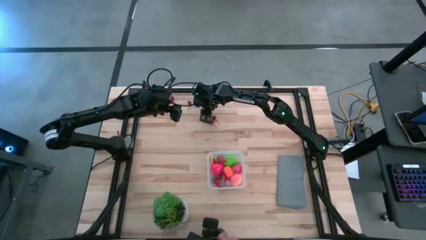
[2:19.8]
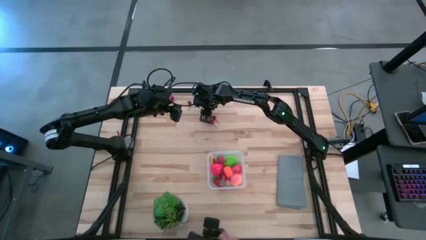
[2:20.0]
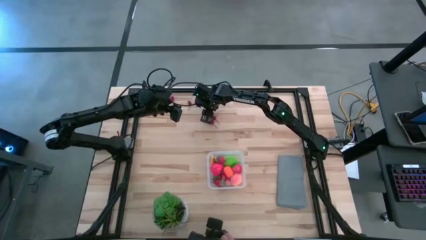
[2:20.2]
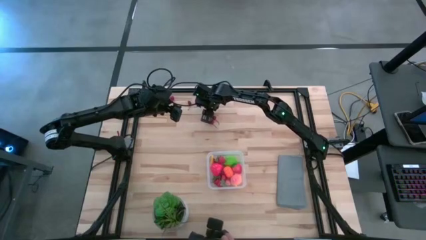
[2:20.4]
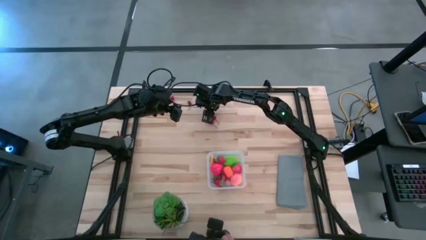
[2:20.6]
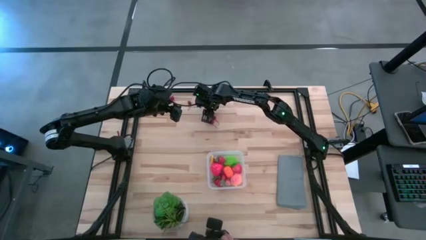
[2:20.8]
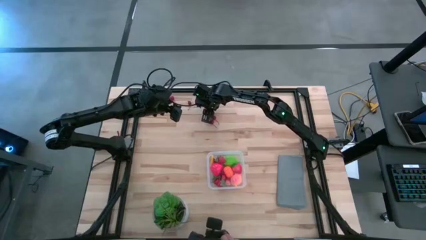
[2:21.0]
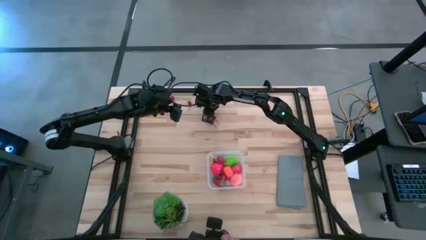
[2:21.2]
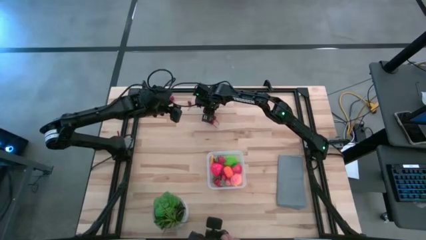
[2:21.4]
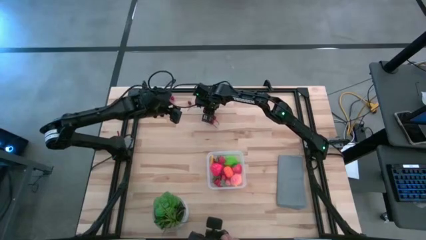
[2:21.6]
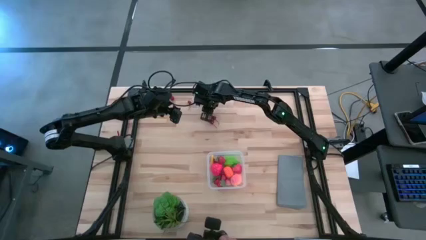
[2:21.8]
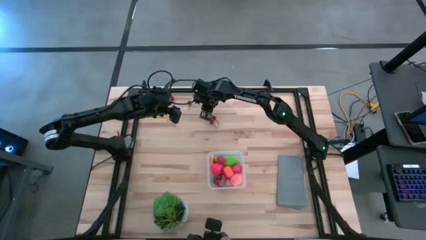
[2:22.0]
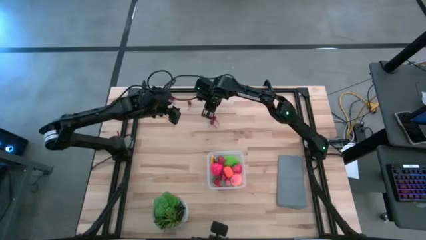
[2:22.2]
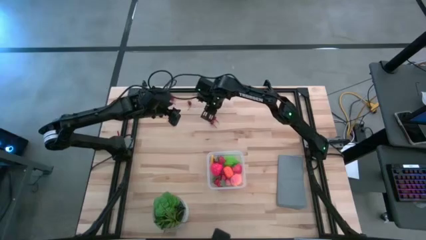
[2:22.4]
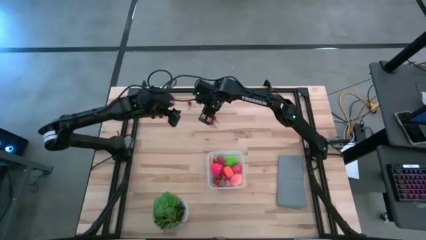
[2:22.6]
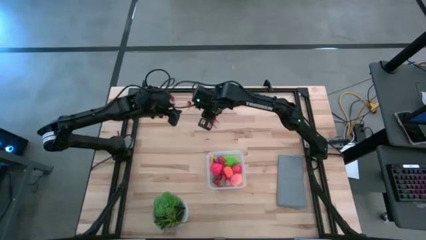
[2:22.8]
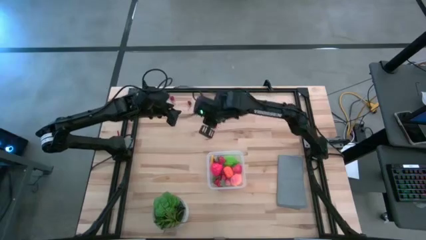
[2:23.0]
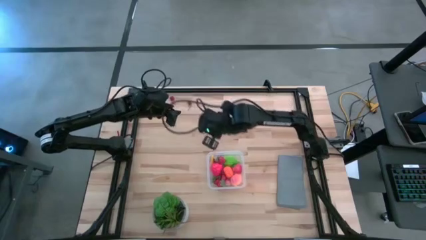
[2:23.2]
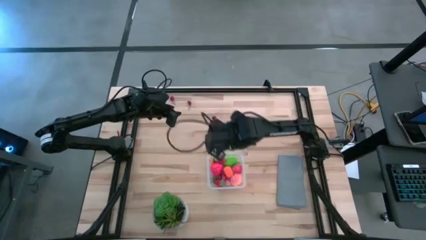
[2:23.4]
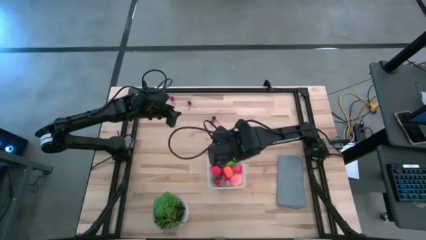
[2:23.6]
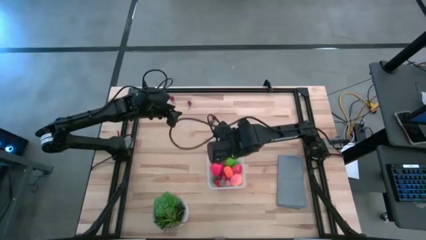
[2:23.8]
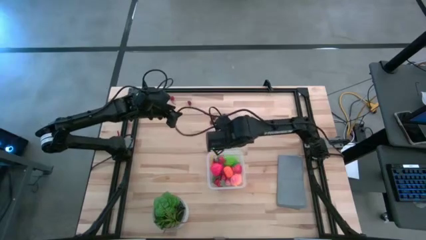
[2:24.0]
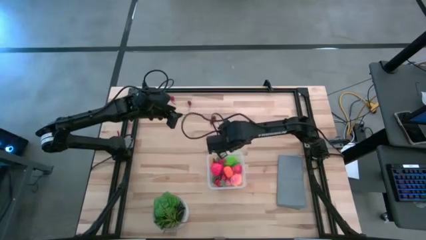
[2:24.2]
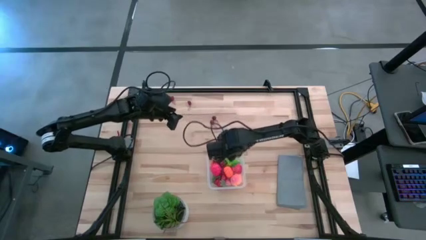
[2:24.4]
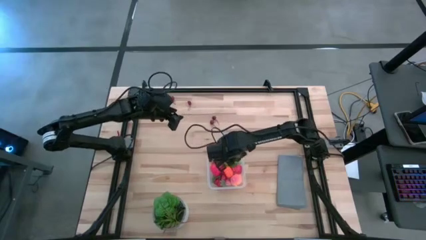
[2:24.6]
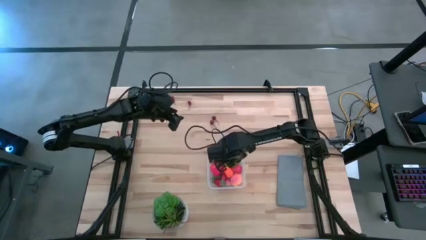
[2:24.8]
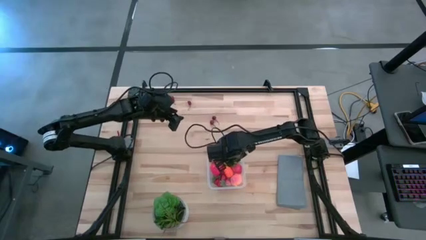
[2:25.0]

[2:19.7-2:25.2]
Task: Pick and placing Produce into tupperware
Put the red strawberry into the transparent bin

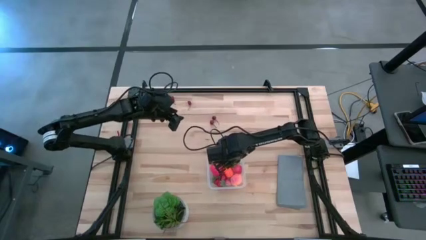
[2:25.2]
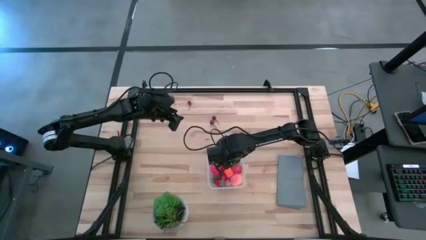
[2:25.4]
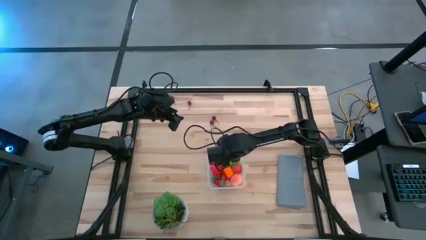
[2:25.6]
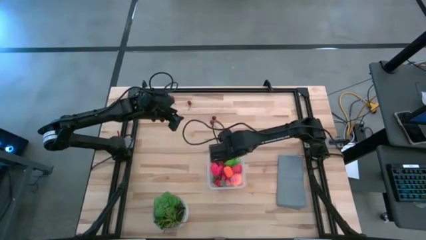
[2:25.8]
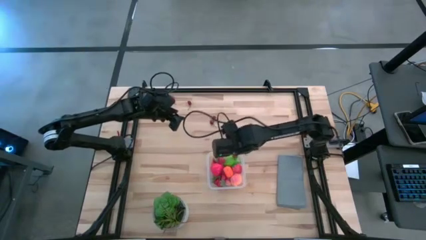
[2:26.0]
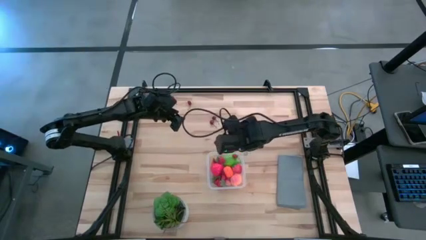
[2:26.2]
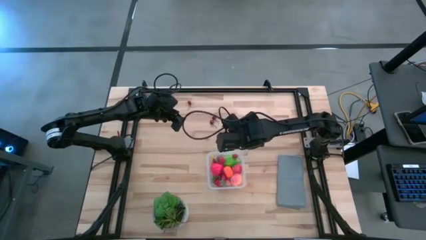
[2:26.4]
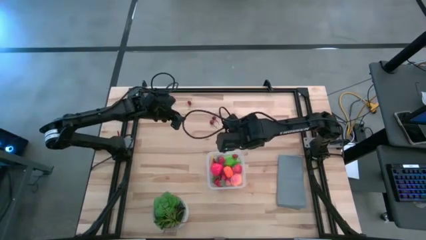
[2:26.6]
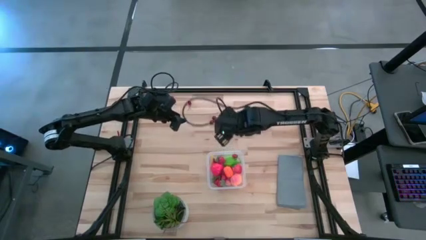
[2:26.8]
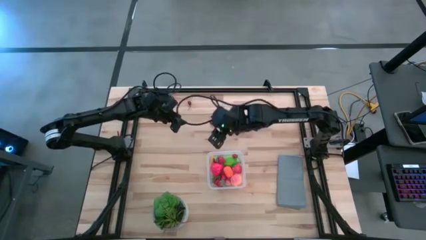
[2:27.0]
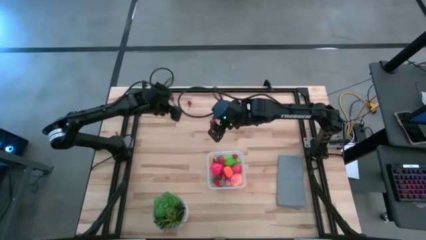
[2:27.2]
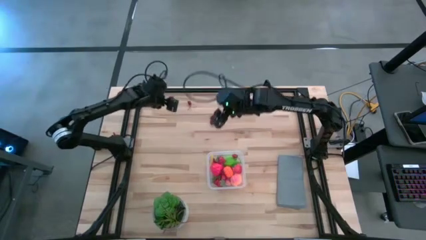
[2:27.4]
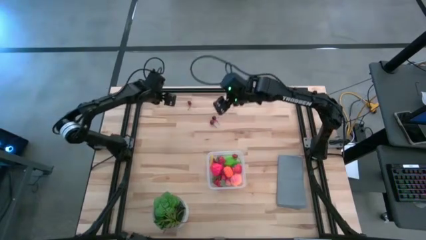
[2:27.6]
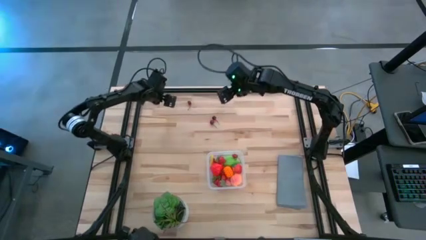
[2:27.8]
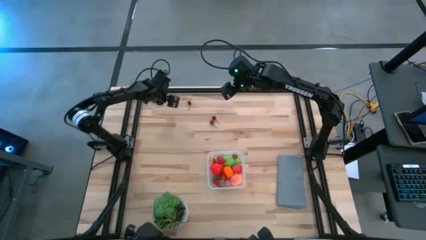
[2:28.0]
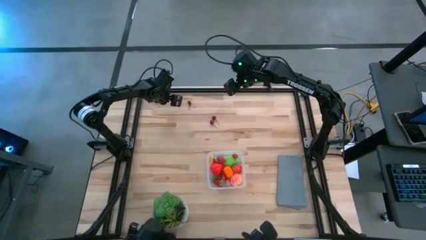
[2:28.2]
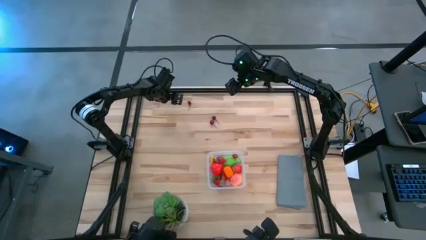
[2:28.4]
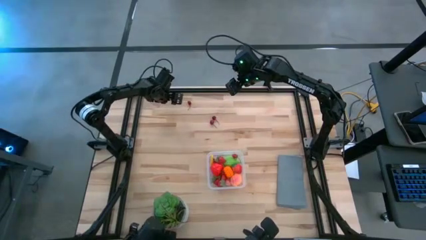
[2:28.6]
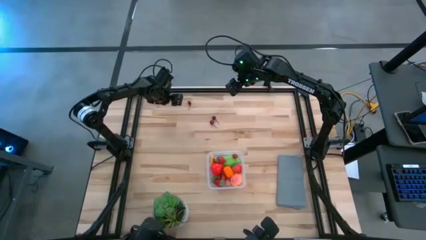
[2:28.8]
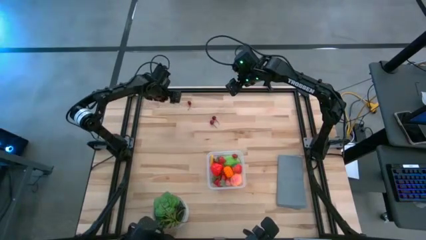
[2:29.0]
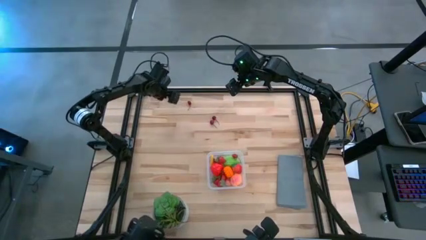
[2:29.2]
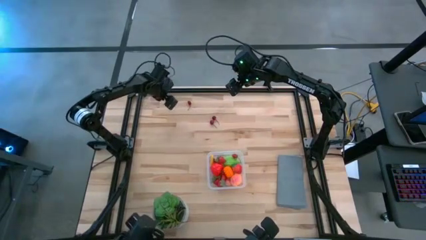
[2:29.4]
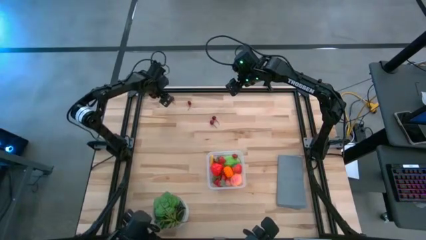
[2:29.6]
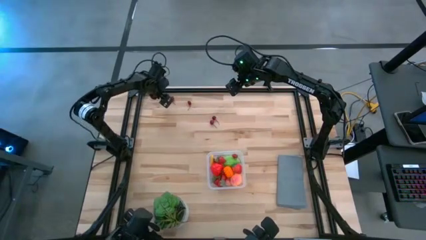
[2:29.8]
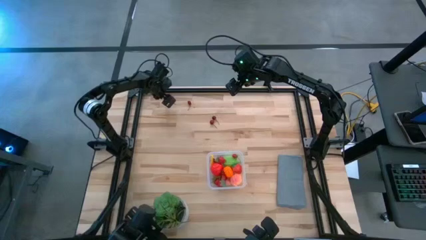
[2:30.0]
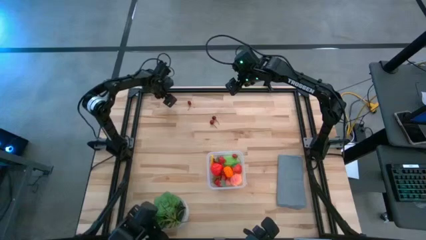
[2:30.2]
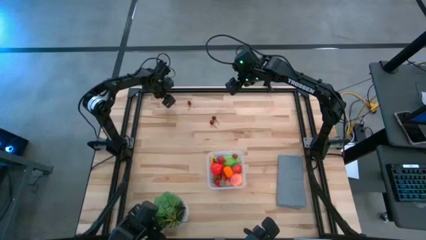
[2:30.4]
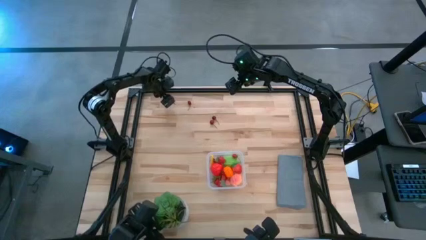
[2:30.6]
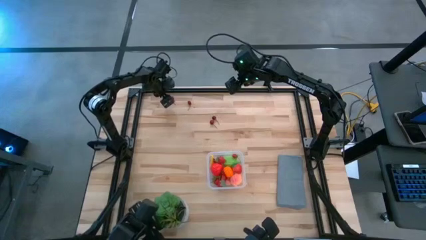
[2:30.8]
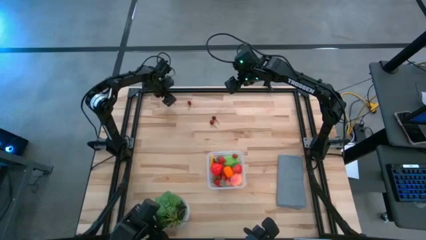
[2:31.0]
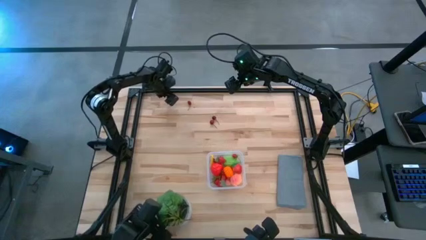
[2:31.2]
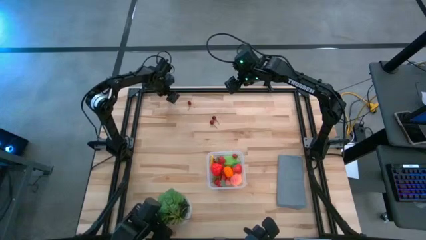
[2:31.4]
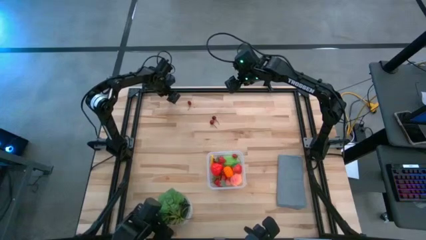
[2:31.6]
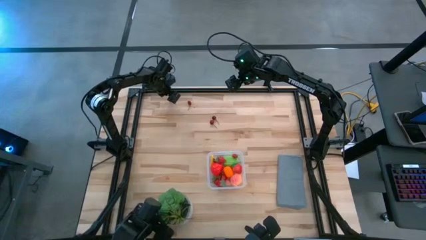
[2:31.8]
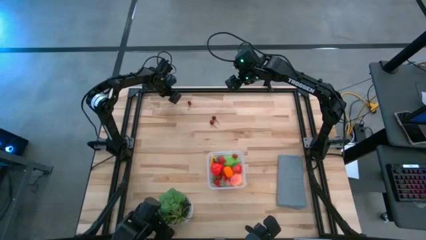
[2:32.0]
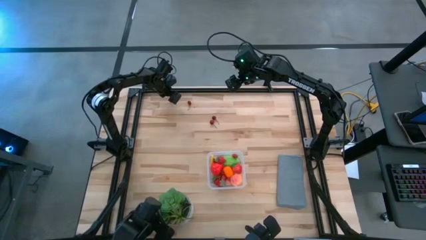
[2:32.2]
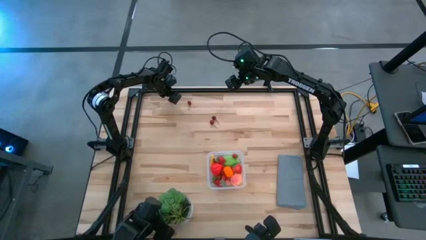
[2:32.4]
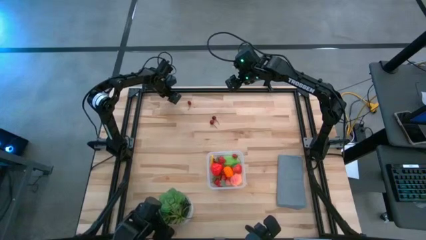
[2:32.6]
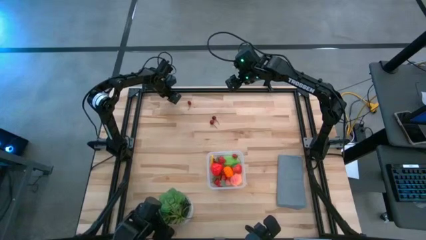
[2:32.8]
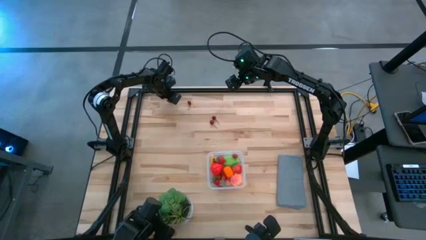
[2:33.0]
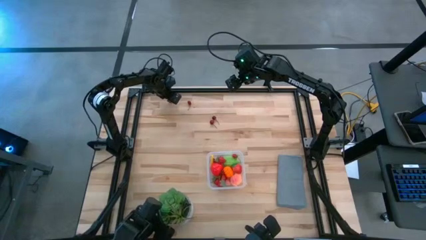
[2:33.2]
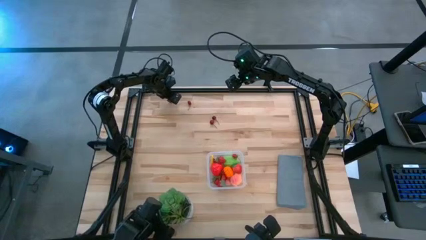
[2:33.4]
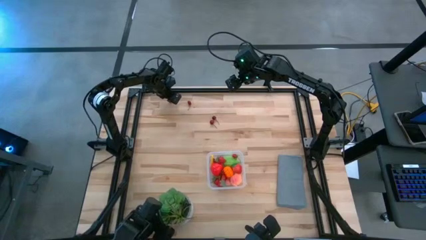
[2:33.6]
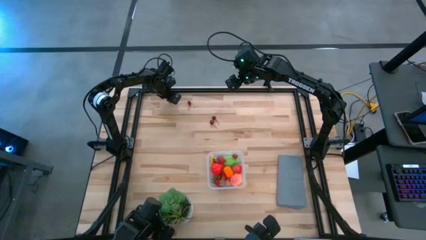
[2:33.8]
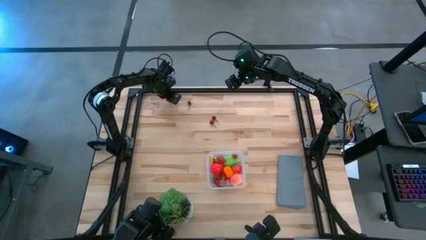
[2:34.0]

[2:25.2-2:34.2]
Put the red cherry into the transparent bin
